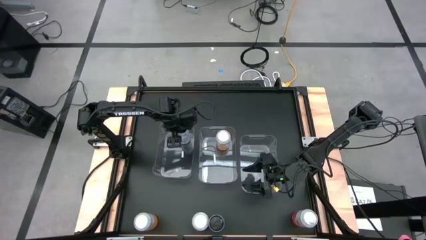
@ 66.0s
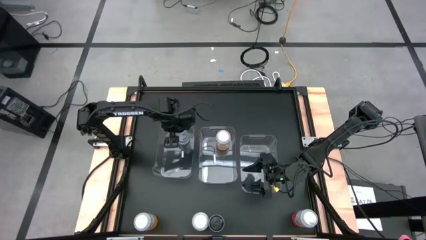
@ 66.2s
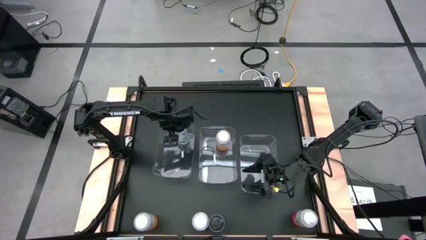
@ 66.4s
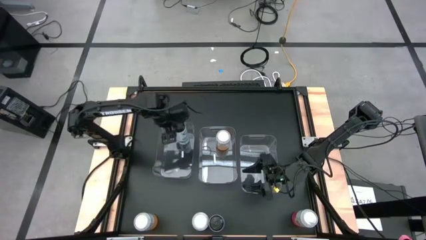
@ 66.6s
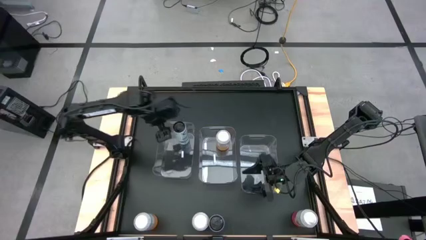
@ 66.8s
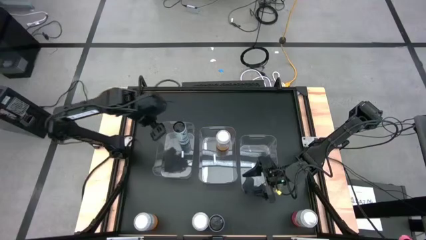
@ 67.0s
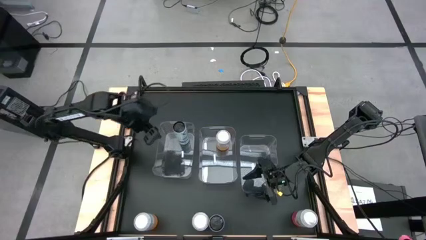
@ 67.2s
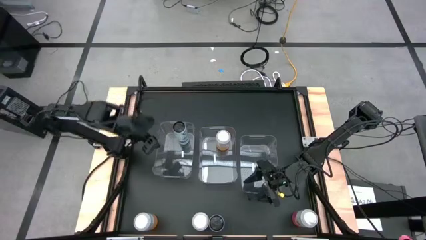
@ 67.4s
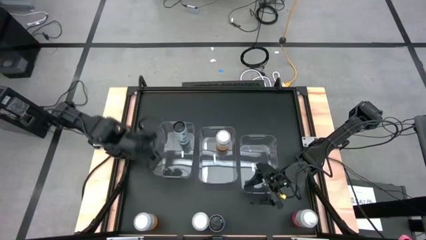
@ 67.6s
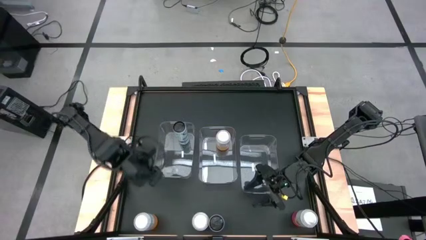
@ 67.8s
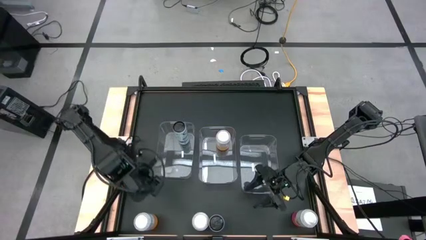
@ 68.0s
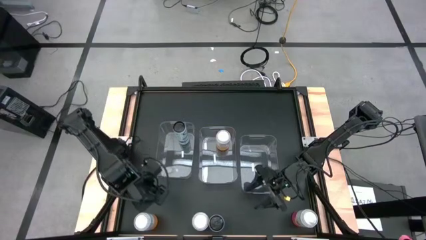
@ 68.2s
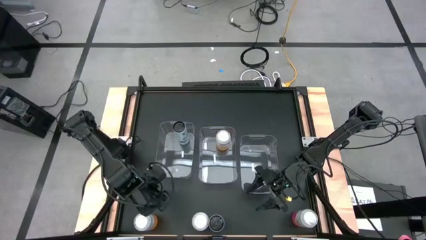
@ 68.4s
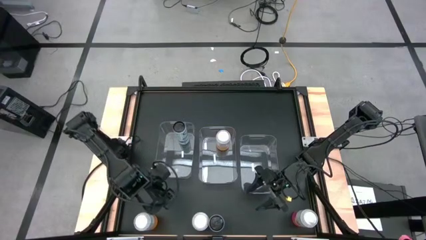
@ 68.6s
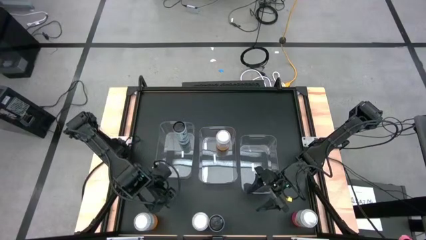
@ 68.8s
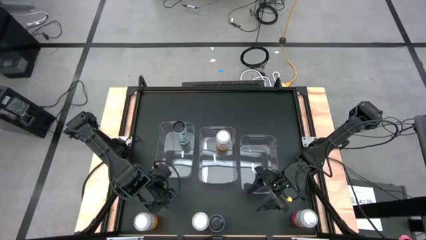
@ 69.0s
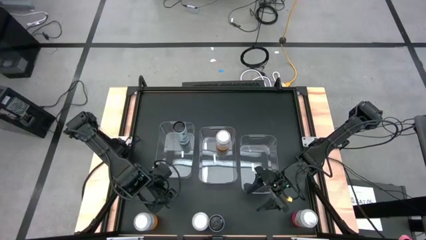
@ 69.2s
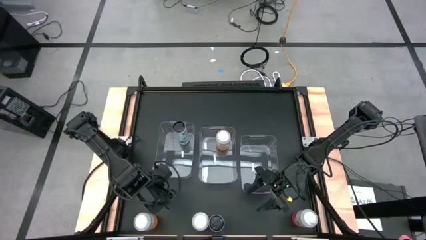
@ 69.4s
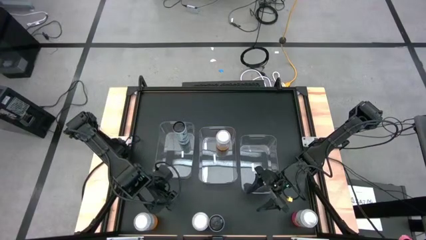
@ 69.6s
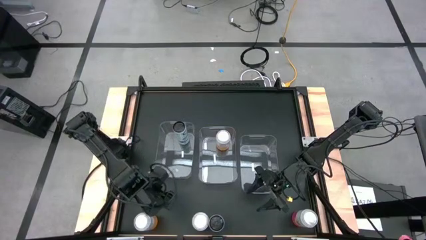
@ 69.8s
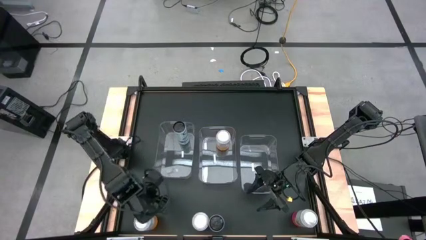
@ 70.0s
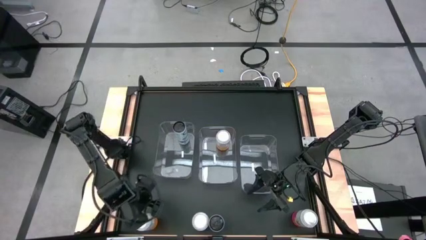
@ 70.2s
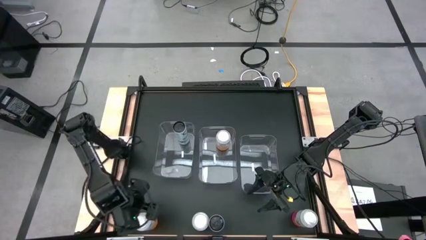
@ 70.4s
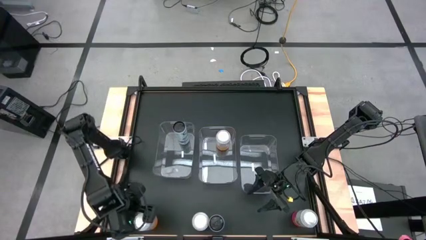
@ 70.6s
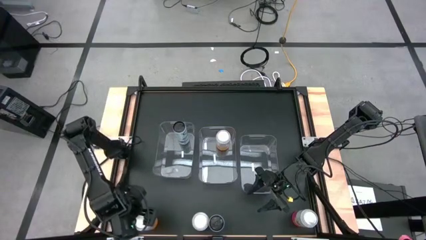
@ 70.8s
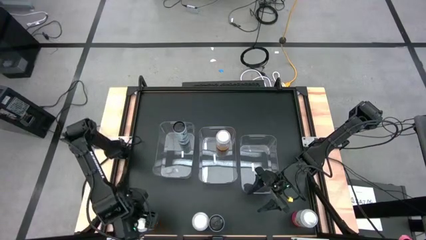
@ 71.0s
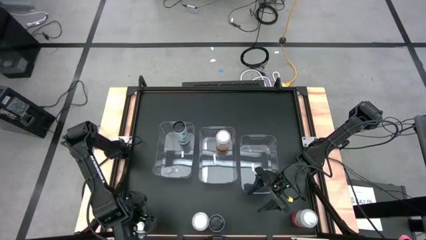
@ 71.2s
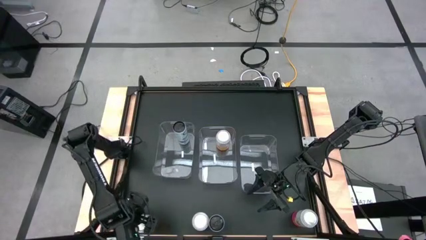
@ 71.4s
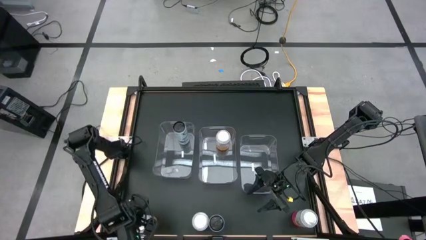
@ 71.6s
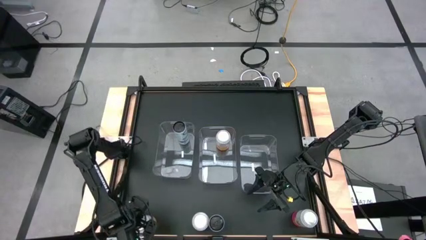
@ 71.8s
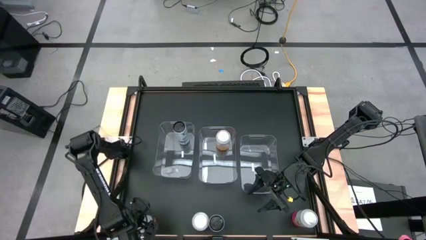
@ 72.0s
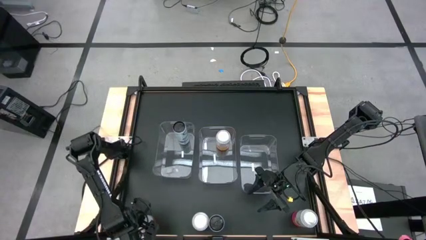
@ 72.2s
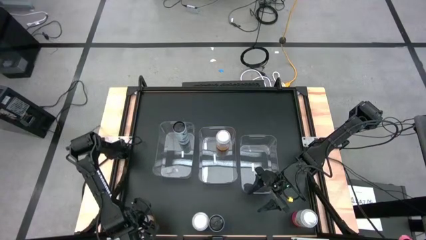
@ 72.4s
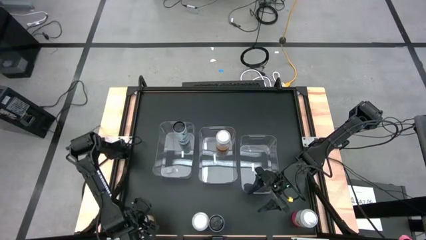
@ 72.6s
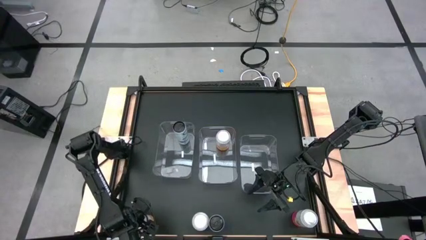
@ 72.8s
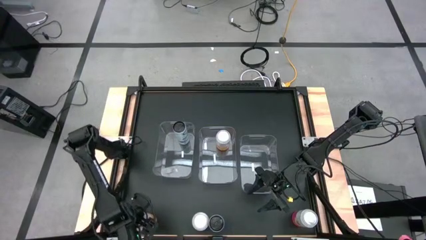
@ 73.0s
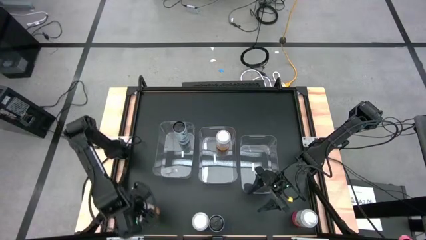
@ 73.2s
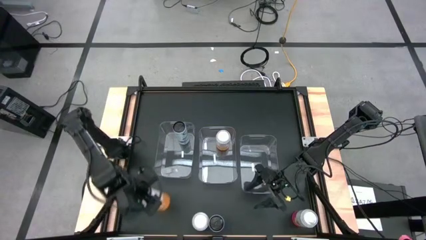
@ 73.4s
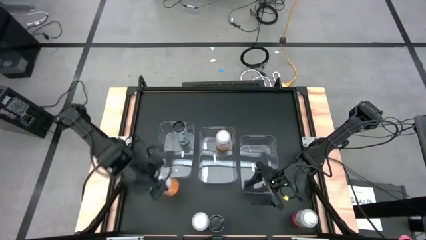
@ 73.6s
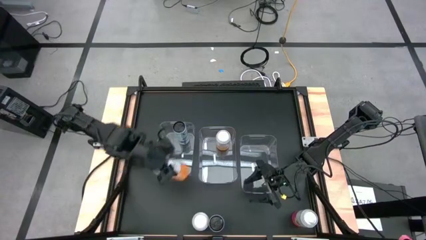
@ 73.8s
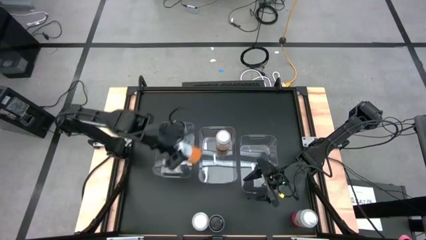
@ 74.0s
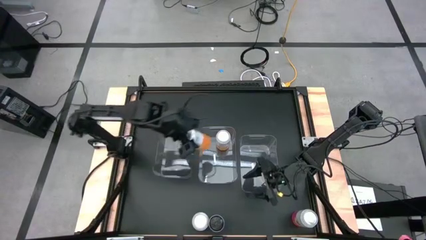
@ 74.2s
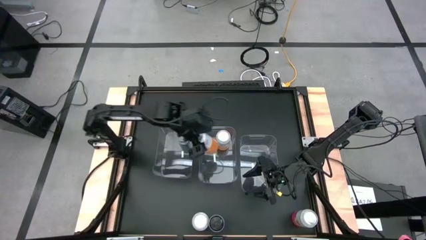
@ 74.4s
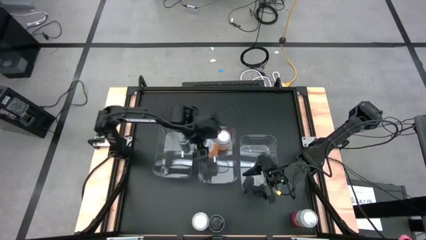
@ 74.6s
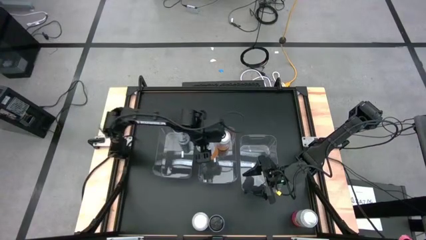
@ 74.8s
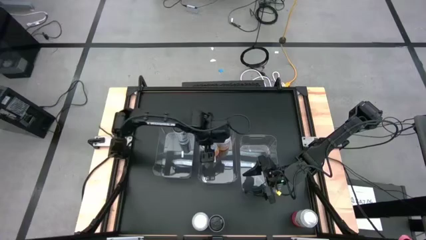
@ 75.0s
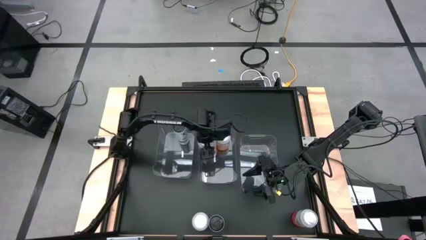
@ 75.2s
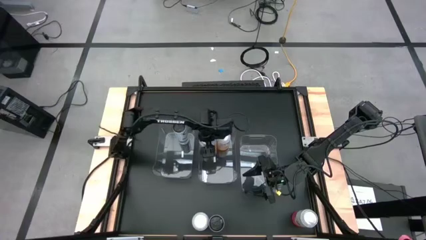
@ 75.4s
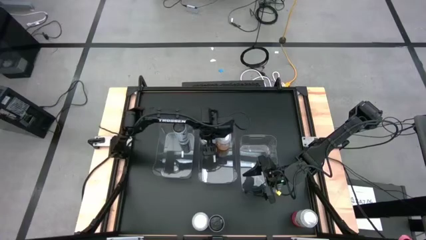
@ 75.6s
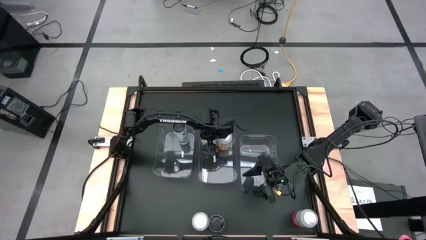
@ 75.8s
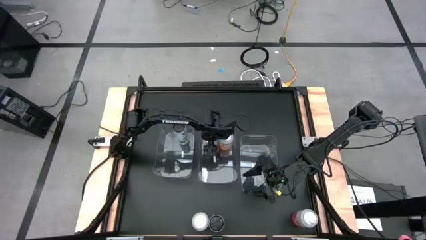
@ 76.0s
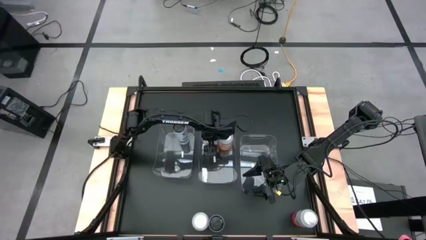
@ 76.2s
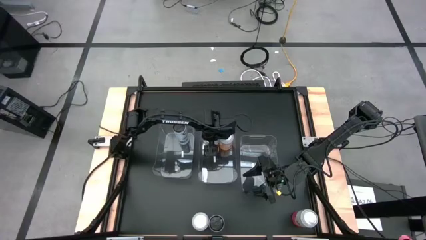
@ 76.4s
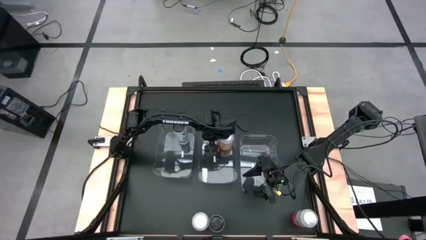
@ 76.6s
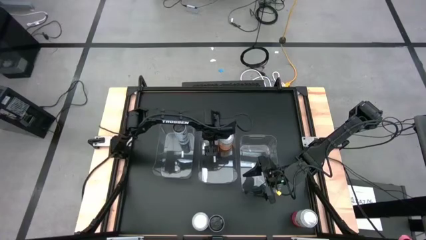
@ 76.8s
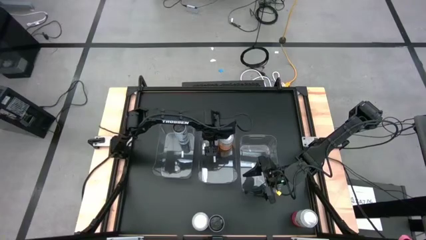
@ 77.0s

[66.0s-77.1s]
Task: Sort soda cans
Put the orange soda can into the middle transparent bin

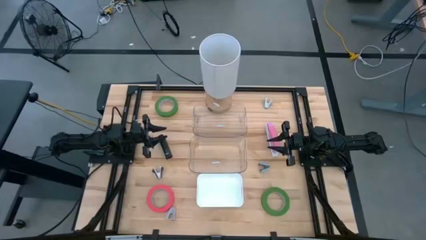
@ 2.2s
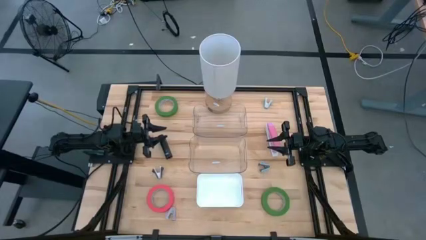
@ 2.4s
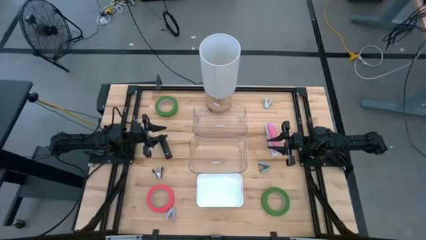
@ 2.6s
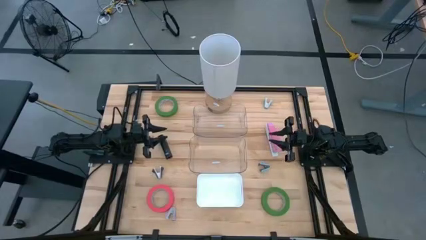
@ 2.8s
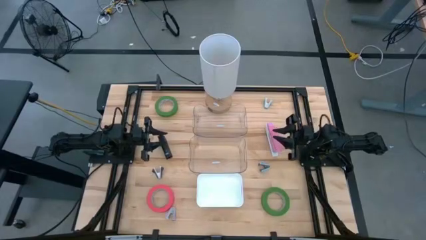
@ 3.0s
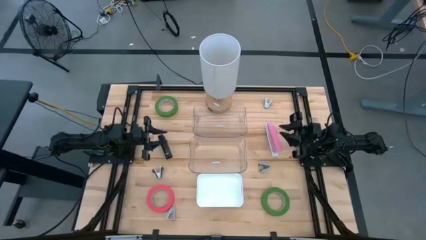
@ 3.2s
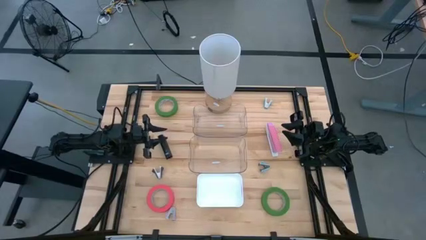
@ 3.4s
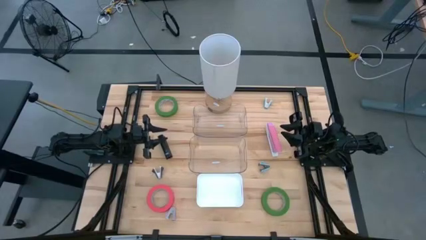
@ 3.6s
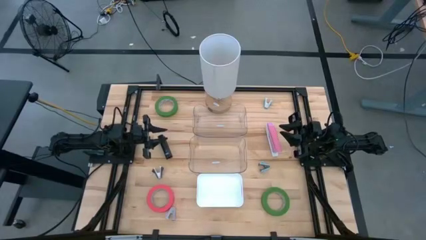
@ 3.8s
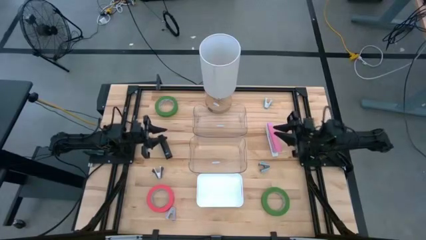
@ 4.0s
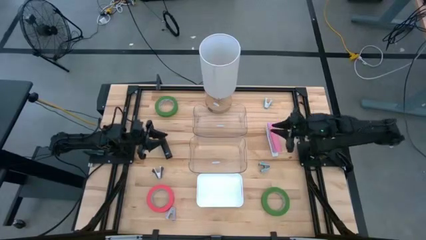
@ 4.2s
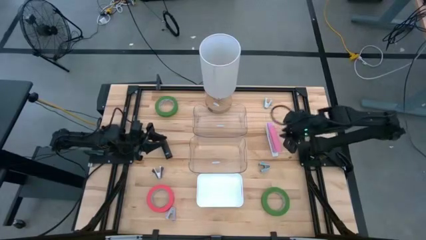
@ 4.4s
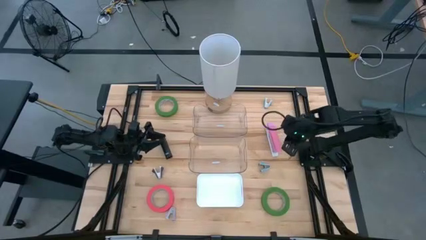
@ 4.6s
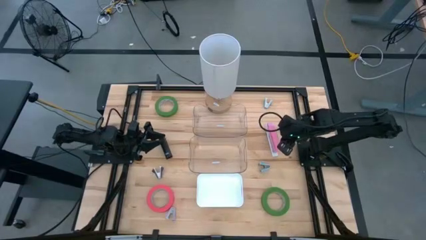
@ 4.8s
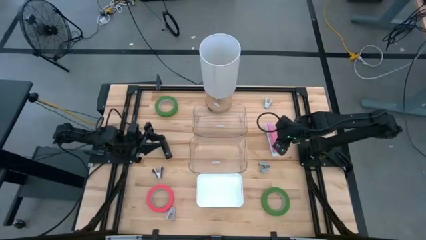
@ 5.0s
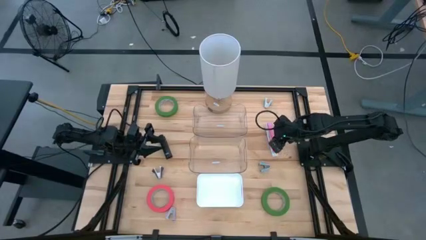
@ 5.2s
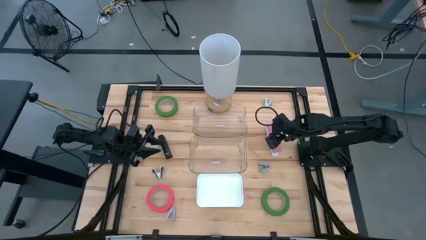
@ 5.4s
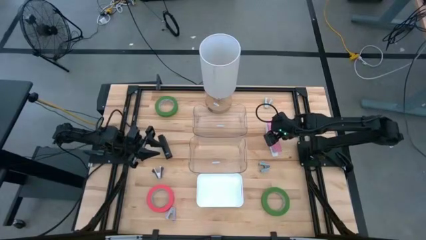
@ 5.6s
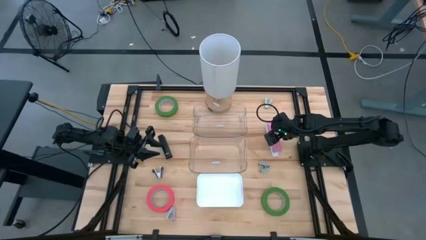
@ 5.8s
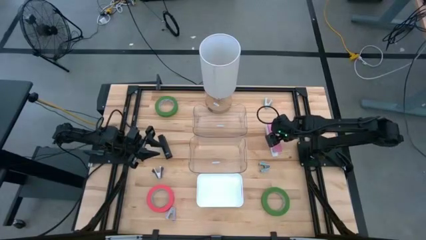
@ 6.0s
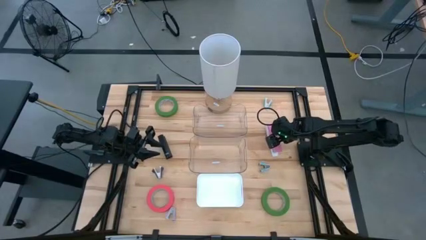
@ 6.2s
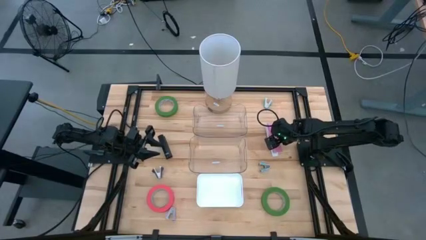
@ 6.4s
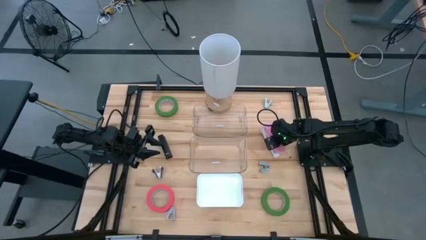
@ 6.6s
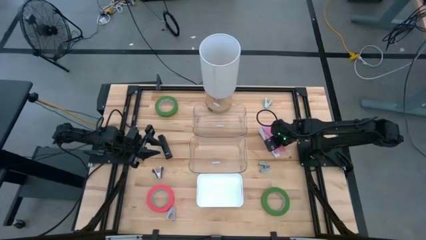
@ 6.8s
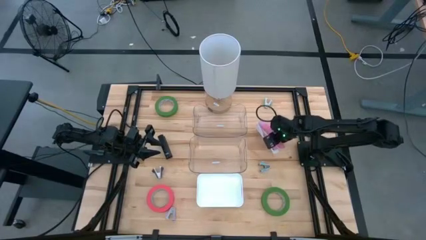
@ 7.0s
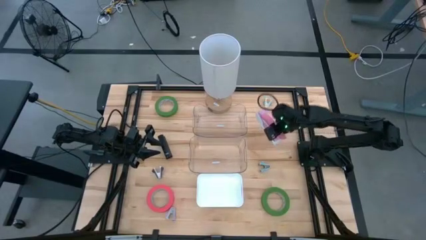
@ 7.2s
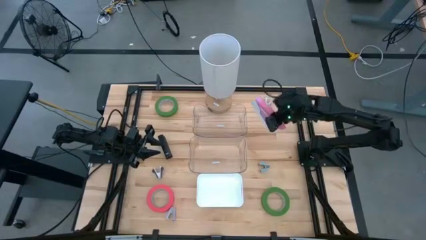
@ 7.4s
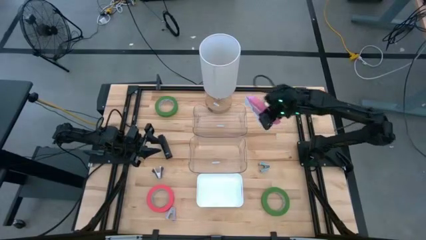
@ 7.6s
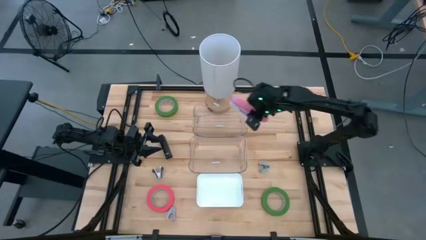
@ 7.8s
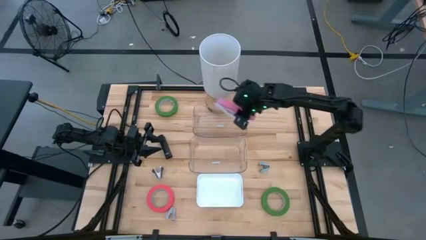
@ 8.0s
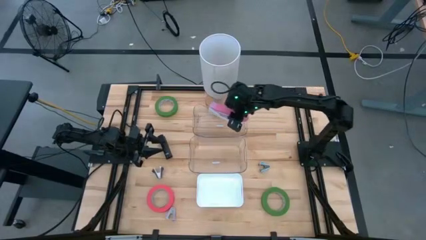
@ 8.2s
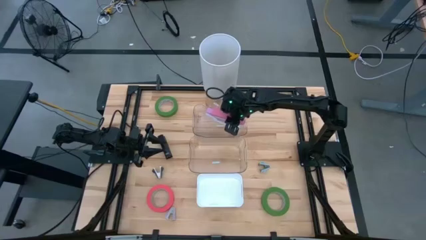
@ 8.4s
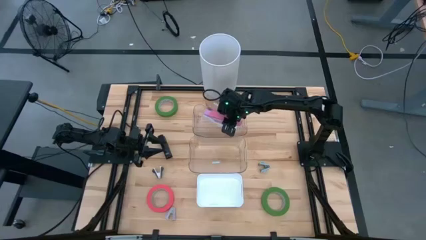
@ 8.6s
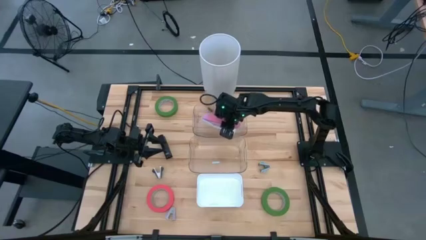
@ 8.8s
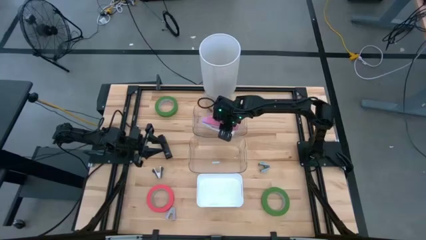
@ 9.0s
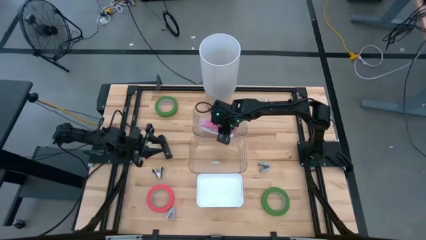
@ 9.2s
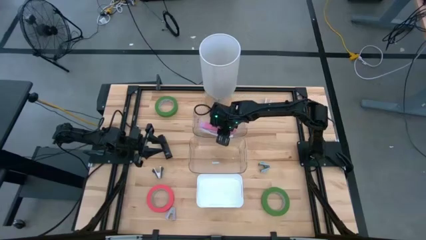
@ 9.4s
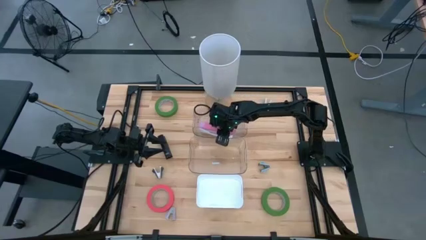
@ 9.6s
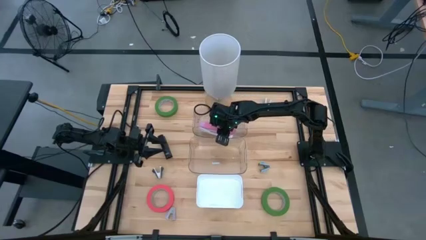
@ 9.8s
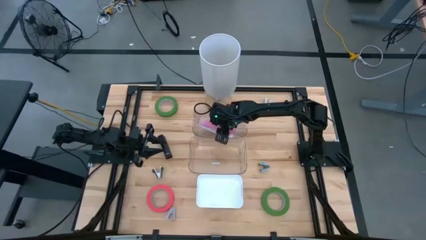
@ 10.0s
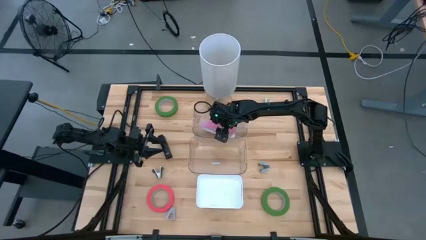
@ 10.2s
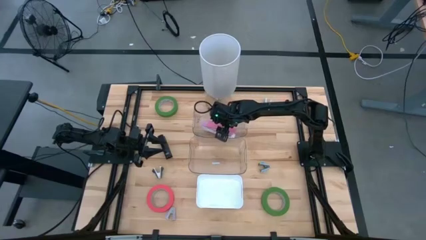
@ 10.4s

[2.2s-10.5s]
Task: Pick and place Stapler, Stapler remover, tape
Put the pink stapler into the top transparent bin
